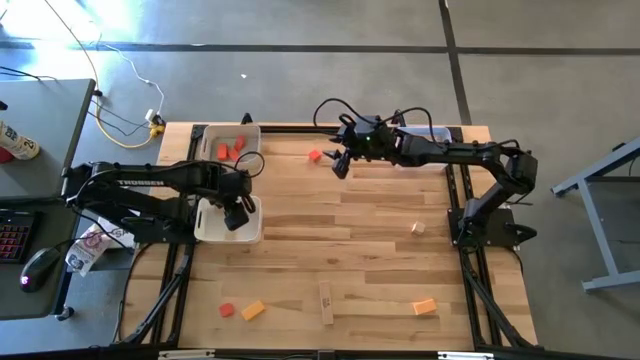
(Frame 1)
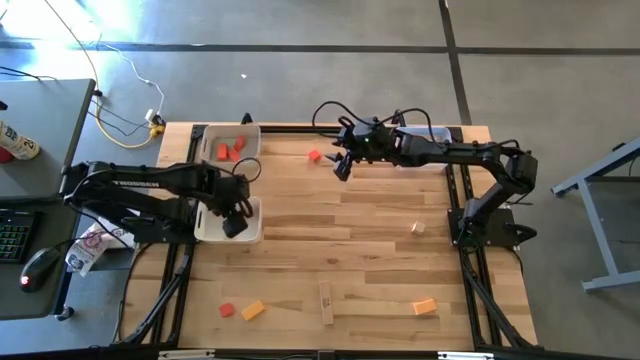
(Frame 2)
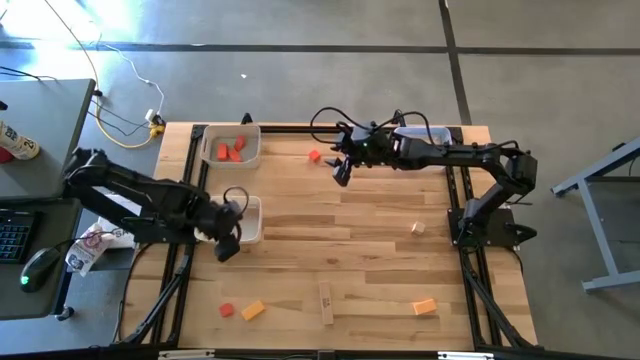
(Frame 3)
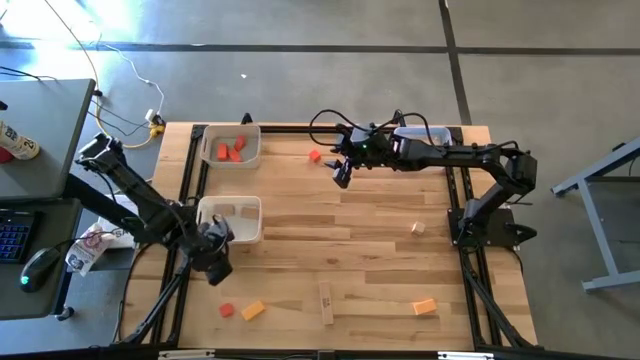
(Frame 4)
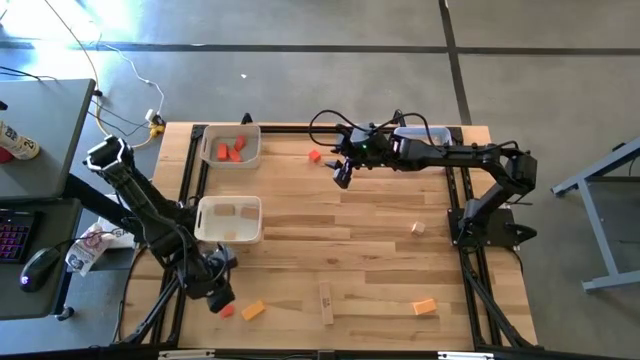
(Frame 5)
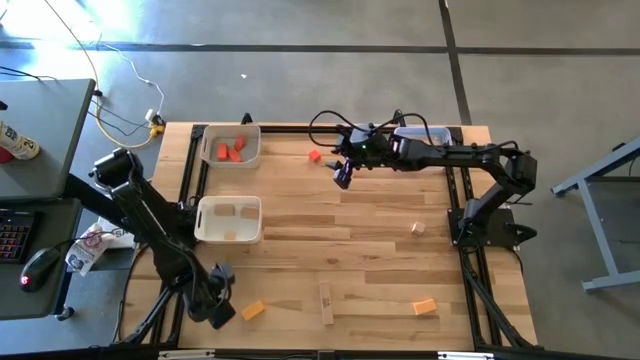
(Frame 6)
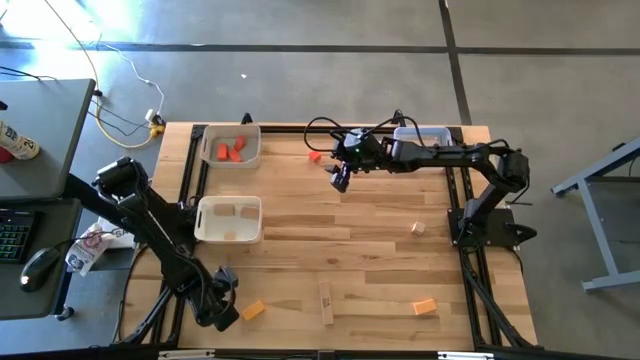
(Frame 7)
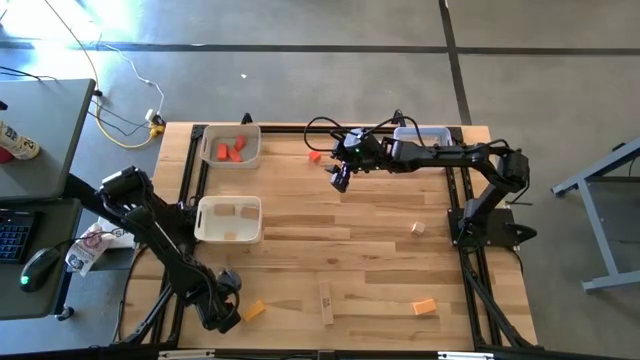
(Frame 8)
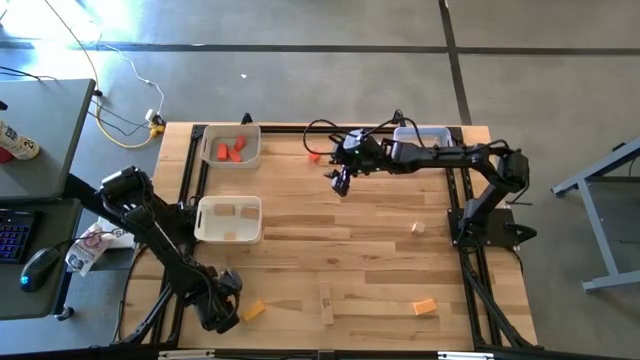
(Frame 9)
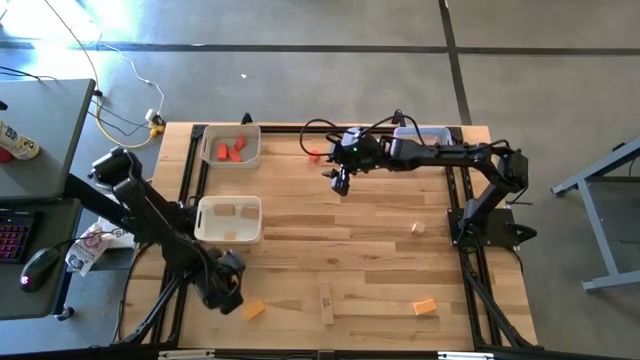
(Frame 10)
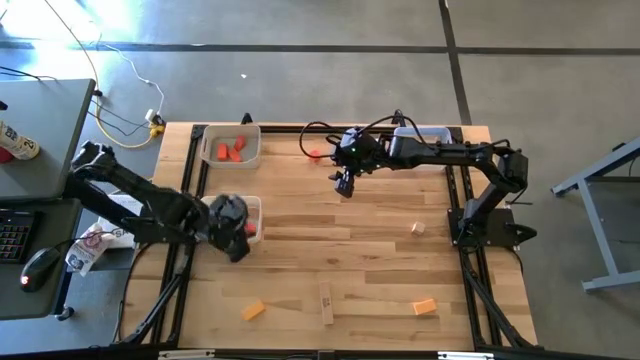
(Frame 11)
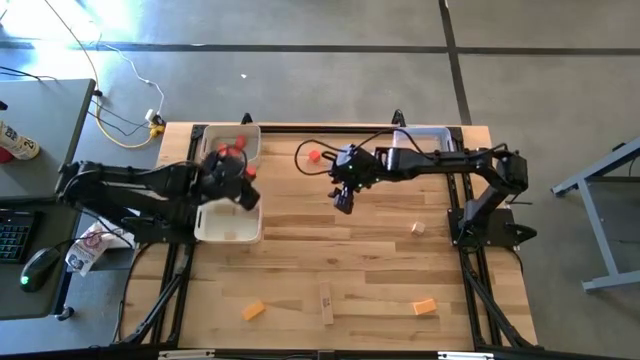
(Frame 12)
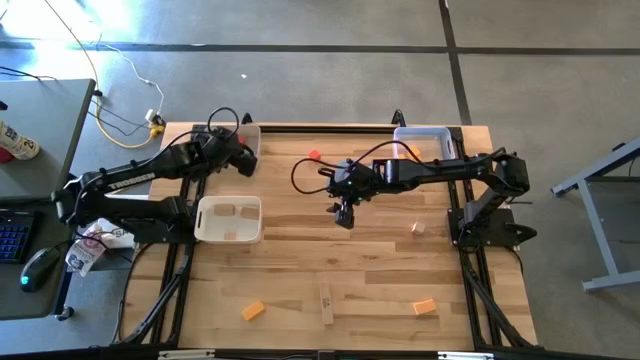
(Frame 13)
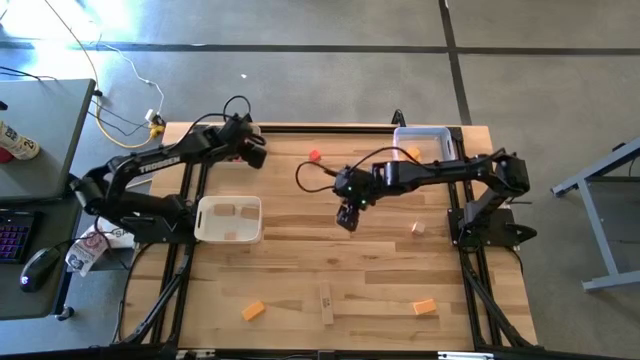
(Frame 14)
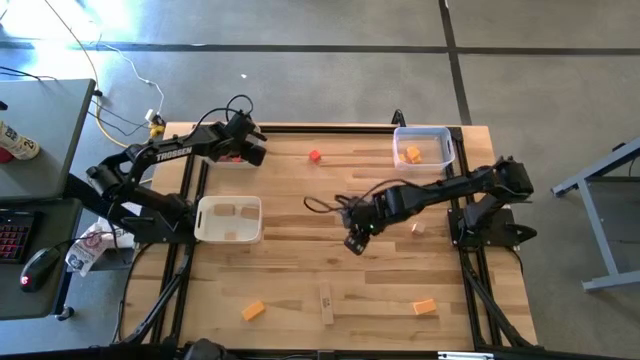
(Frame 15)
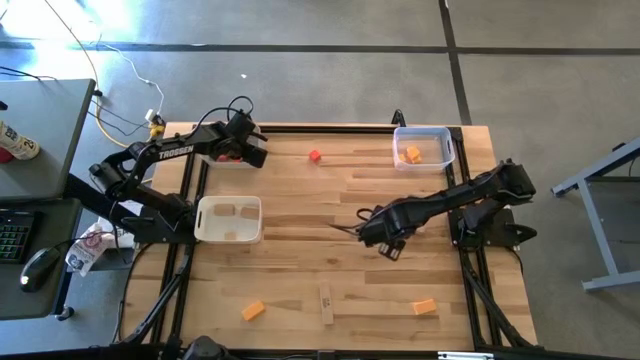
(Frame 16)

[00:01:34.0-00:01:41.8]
Task: Sort & place blocks by color
Put the orange block into the gray bin

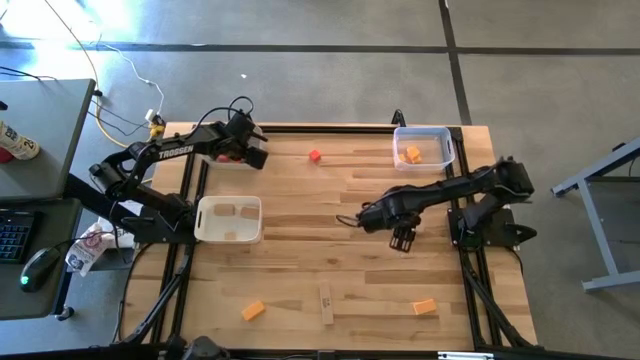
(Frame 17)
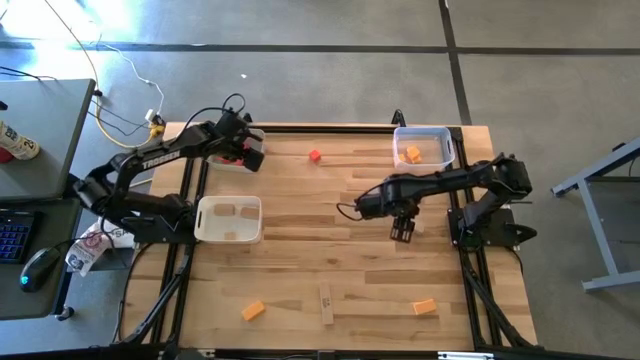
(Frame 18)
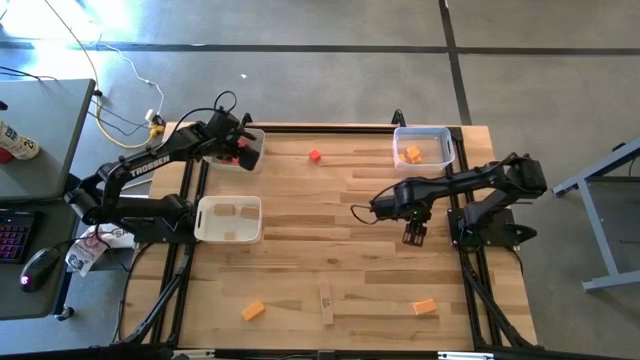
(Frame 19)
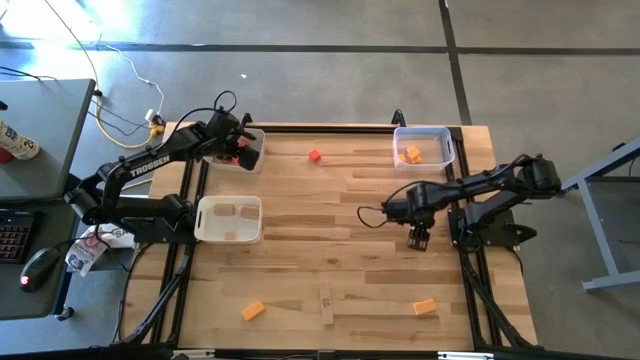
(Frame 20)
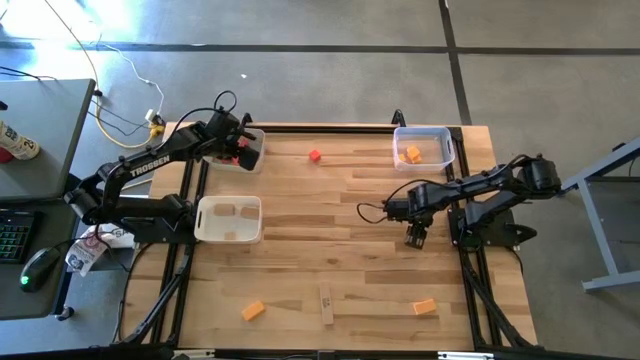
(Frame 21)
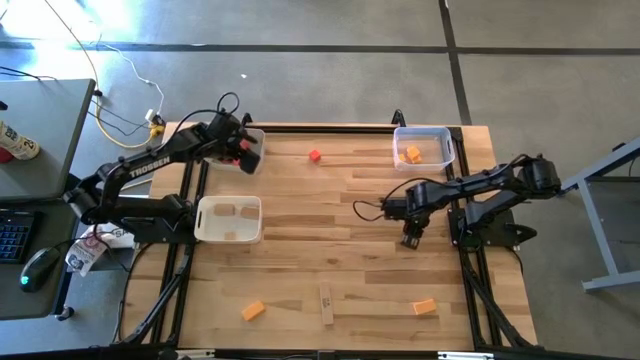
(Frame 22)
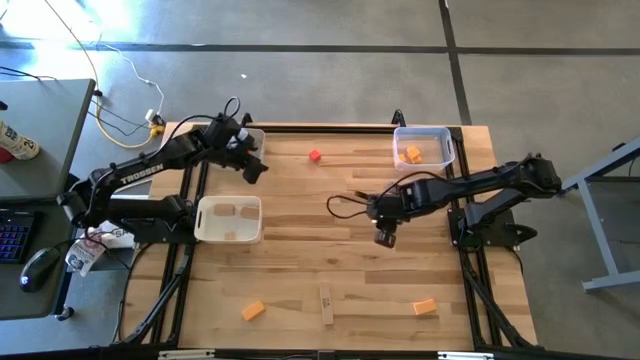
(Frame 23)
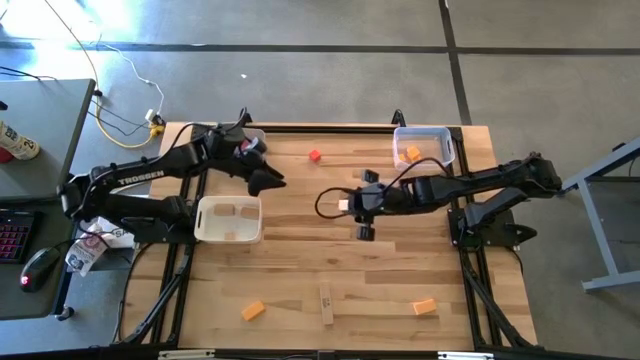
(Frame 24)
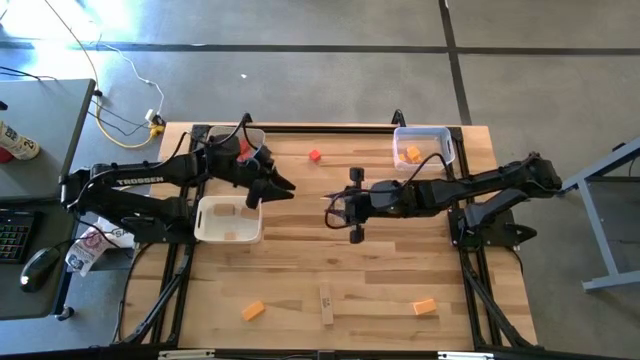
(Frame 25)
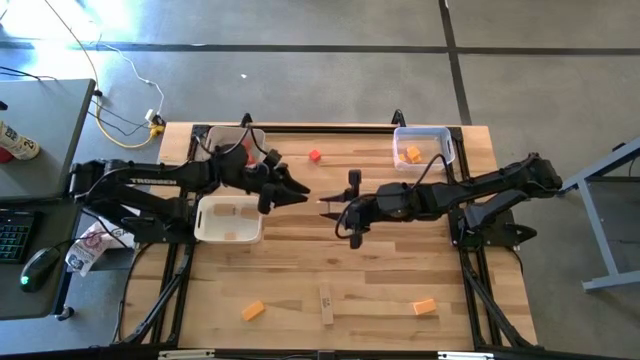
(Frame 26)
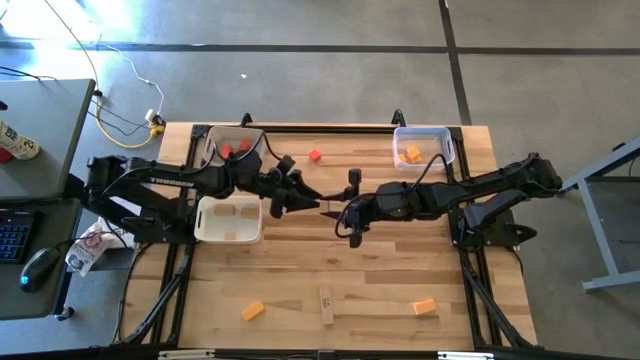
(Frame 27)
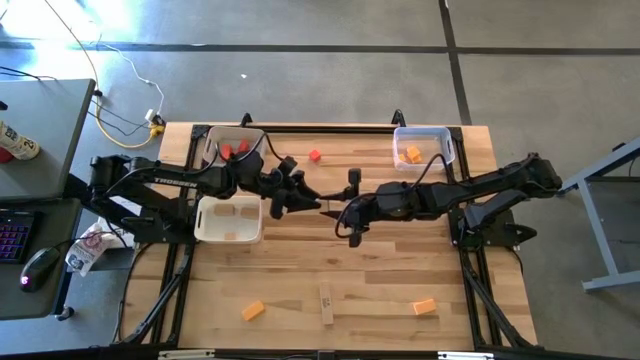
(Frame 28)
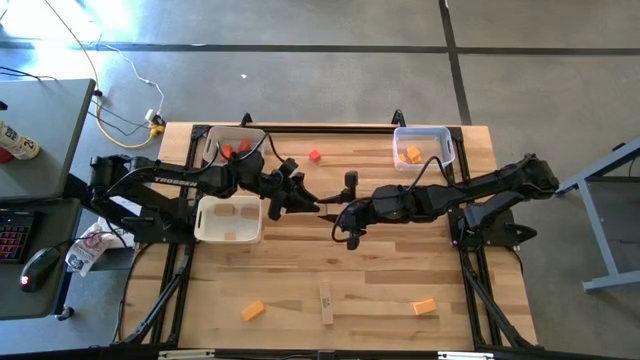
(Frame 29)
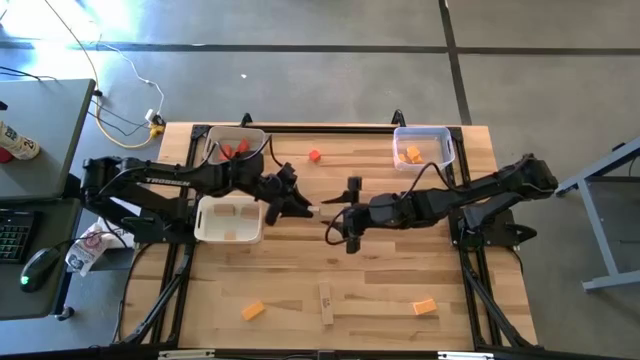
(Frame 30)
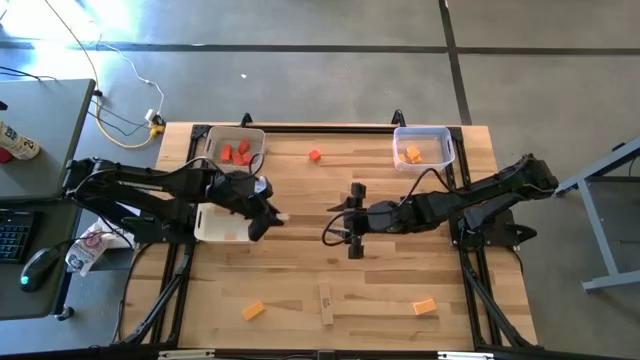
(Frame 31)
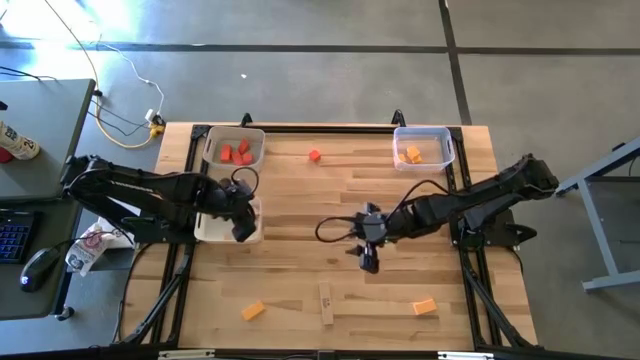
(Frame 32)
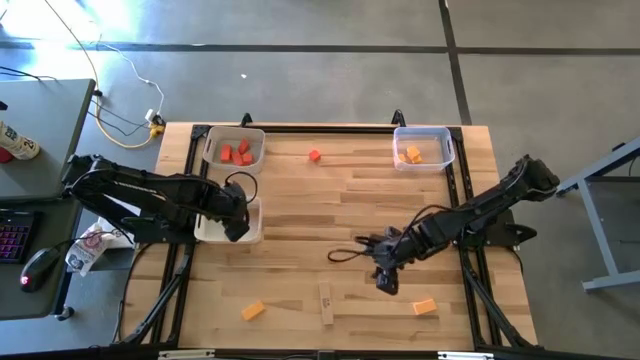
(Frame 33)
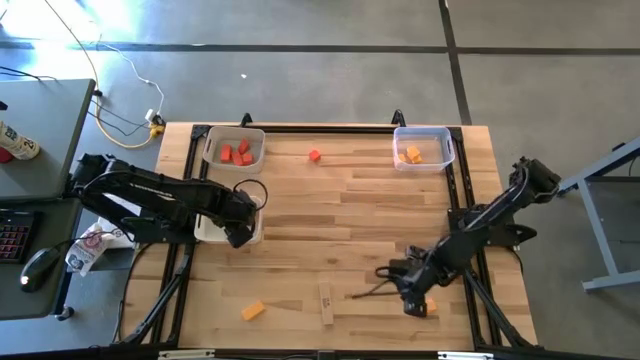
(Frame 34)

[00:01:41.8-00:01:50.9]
Put the brown block into the white bin

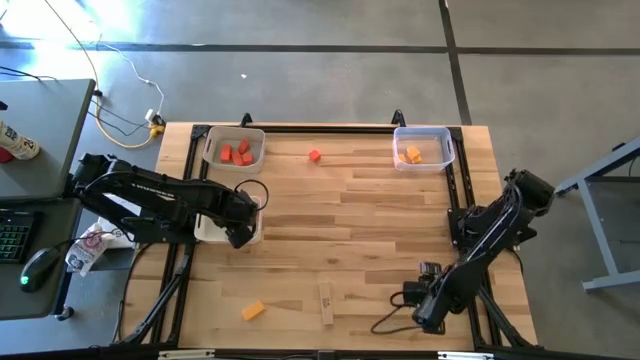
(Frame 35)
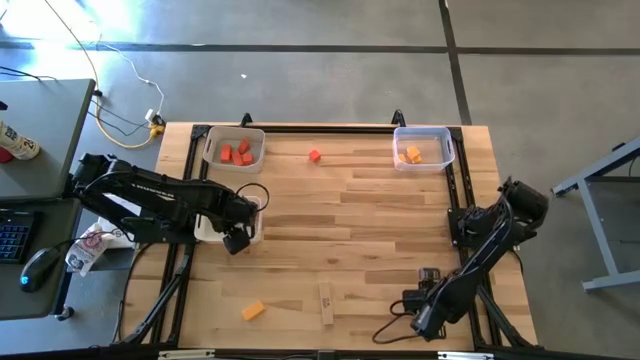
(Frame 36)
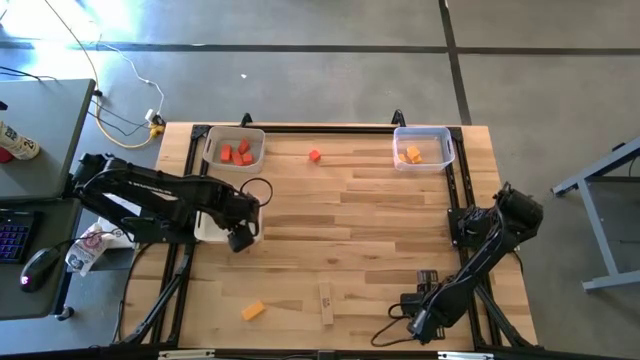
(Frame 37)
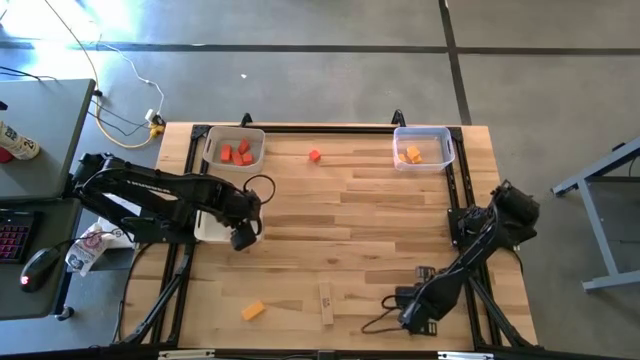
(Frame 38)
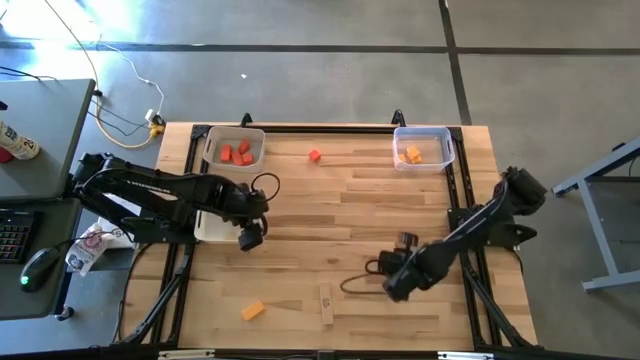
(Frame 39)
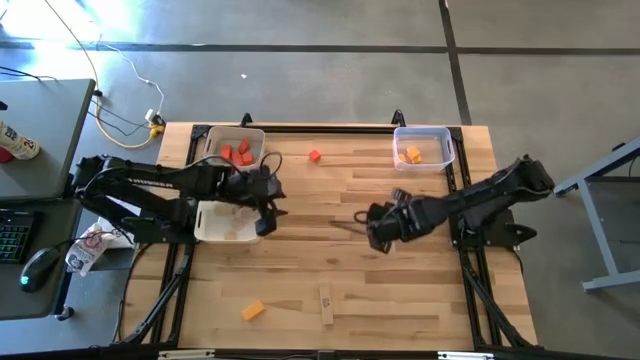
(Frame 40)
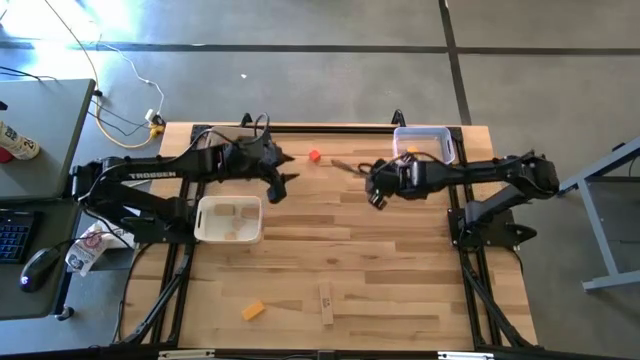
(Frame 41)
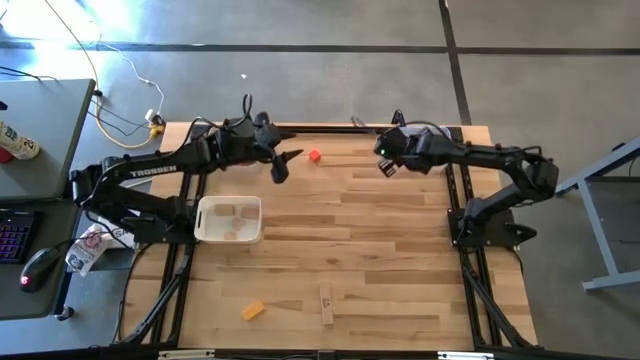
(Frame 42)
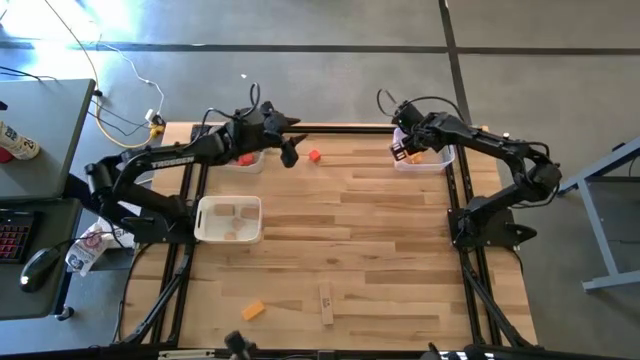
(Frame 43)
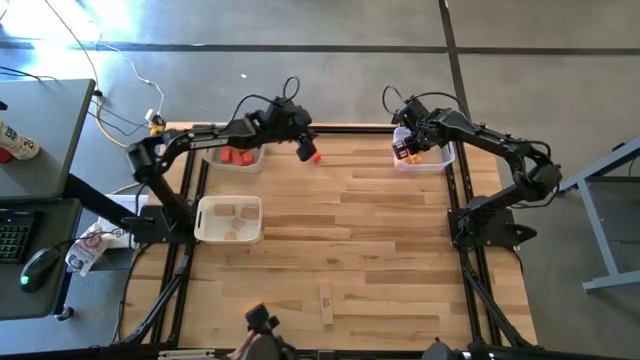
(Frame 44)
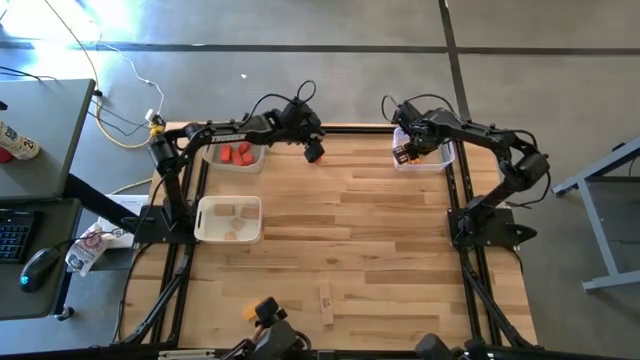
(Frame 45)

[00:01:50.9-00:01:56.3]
Put the yellow block into the transparent bin
